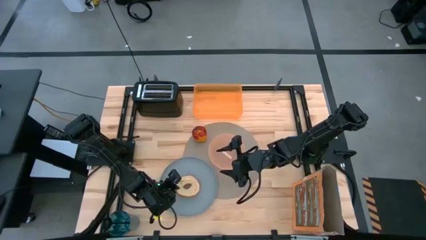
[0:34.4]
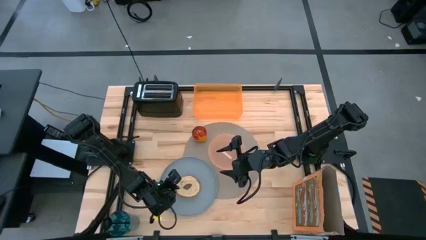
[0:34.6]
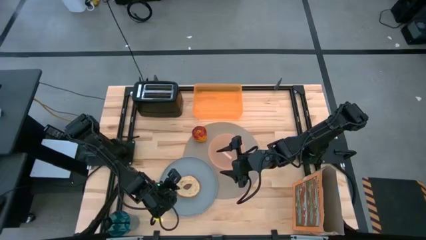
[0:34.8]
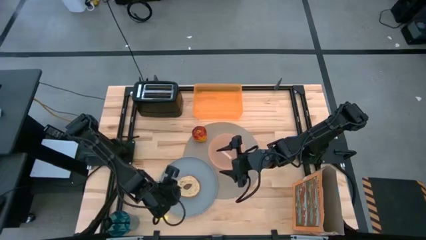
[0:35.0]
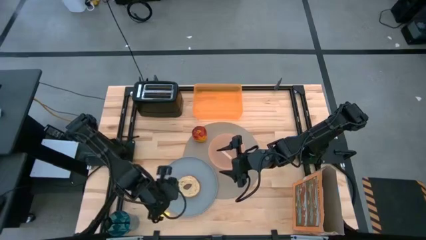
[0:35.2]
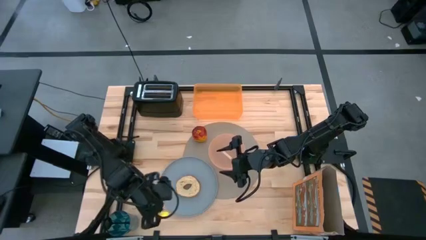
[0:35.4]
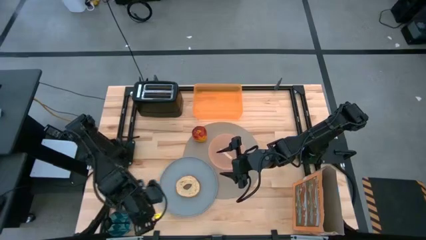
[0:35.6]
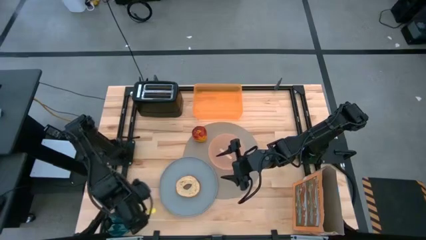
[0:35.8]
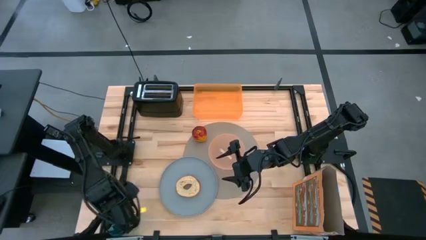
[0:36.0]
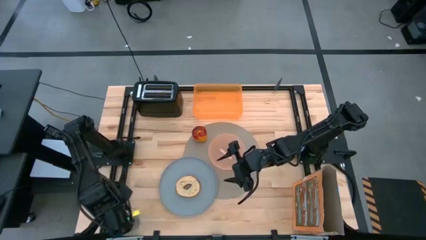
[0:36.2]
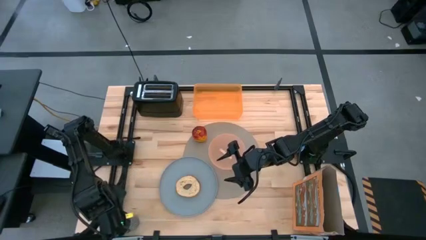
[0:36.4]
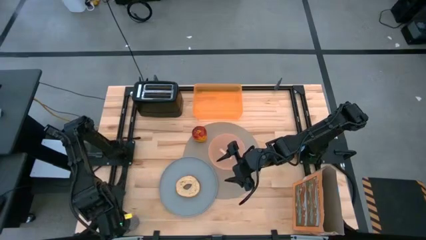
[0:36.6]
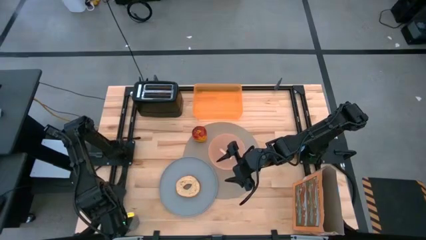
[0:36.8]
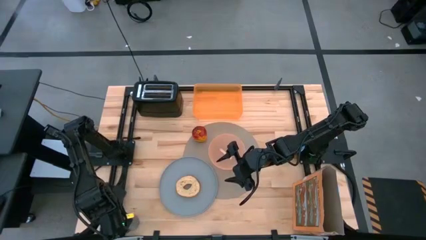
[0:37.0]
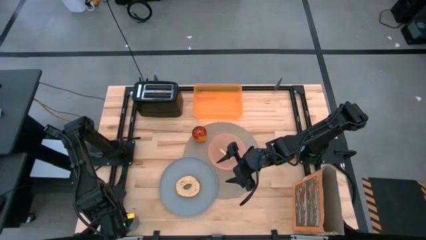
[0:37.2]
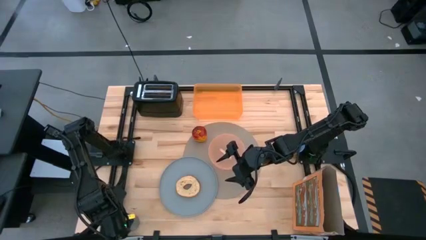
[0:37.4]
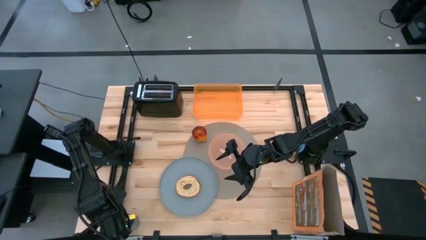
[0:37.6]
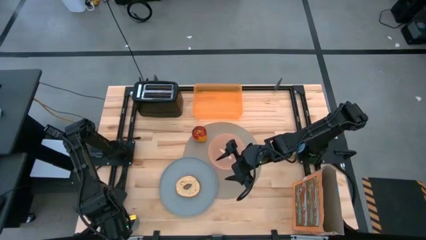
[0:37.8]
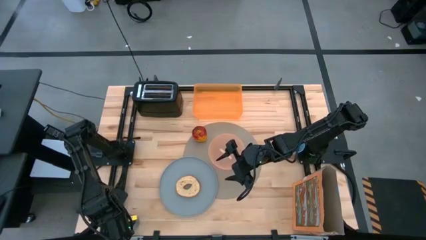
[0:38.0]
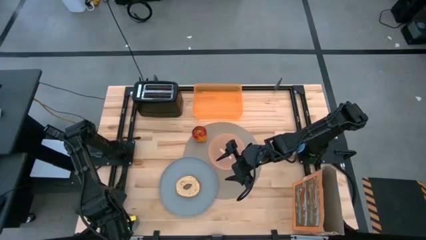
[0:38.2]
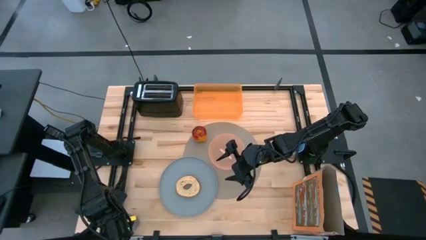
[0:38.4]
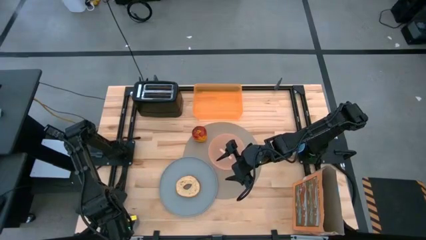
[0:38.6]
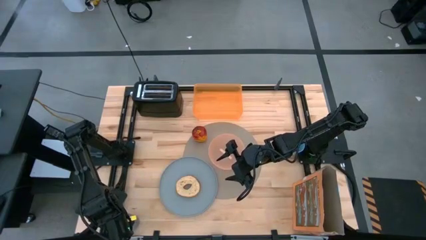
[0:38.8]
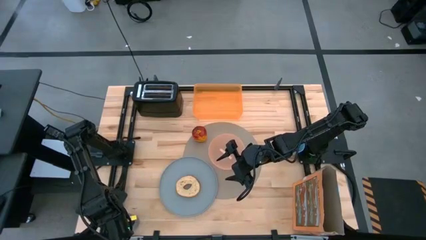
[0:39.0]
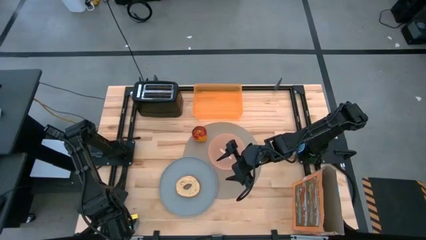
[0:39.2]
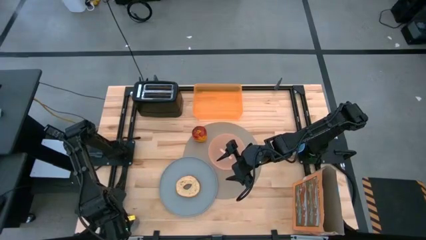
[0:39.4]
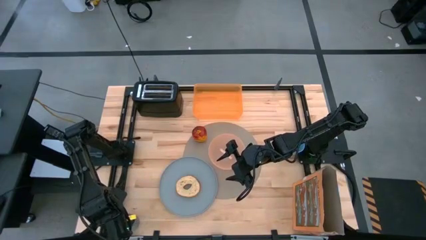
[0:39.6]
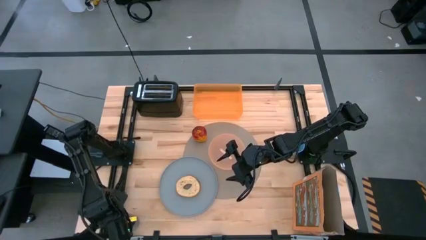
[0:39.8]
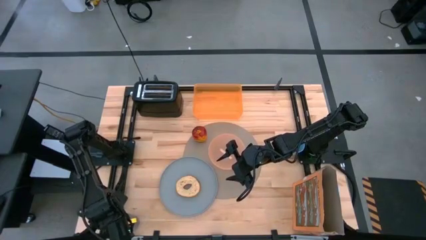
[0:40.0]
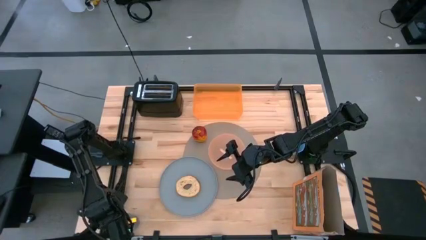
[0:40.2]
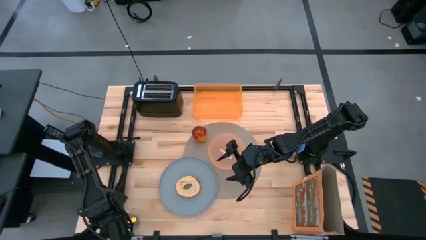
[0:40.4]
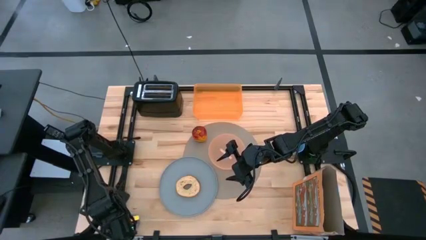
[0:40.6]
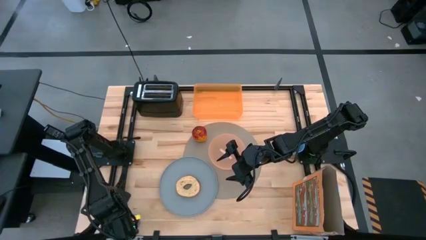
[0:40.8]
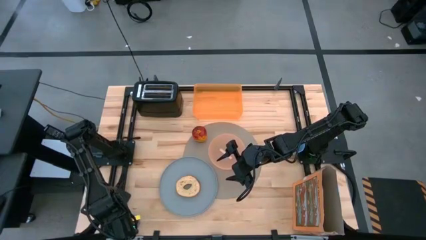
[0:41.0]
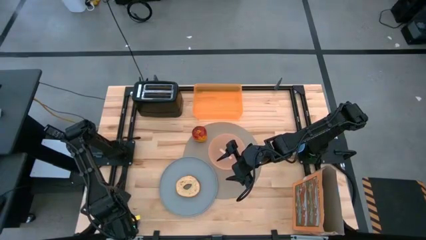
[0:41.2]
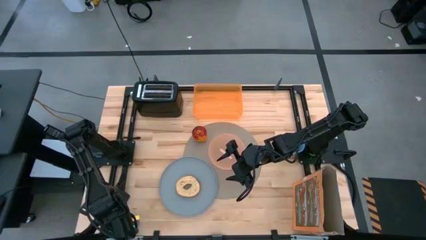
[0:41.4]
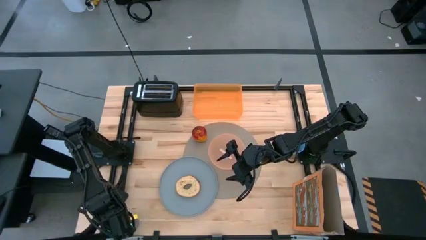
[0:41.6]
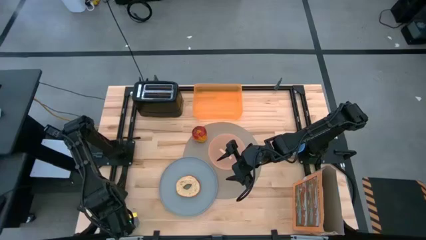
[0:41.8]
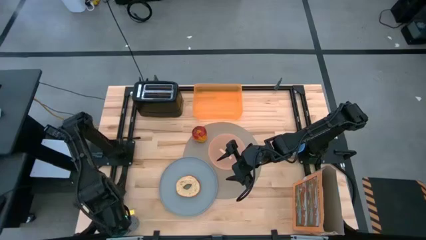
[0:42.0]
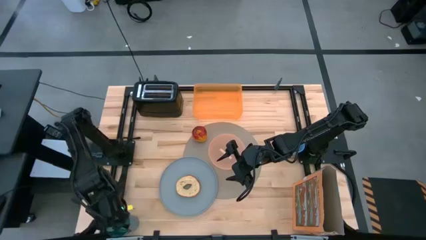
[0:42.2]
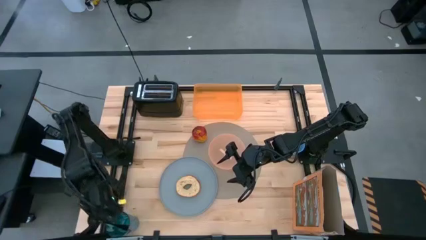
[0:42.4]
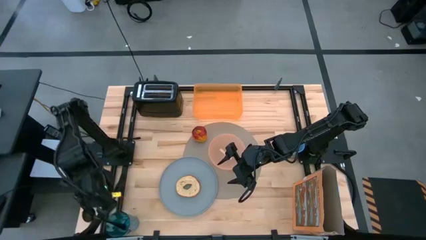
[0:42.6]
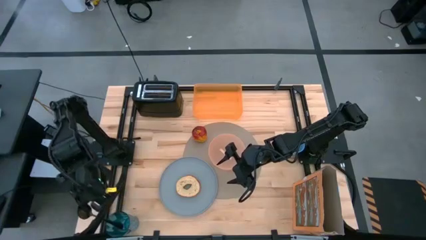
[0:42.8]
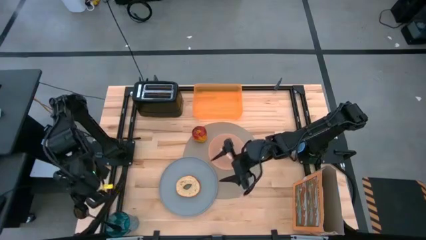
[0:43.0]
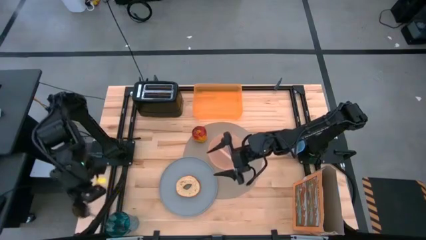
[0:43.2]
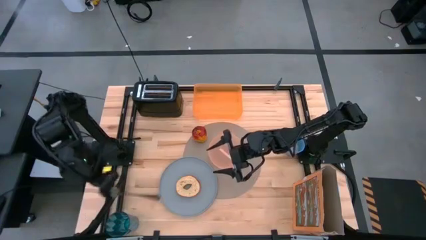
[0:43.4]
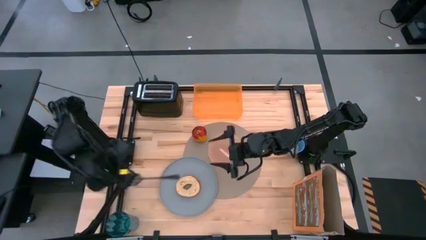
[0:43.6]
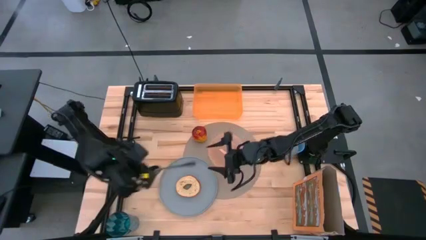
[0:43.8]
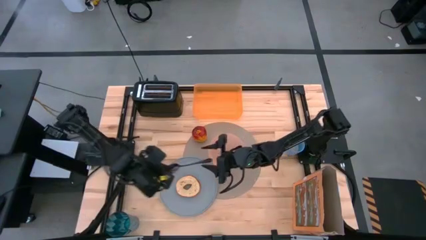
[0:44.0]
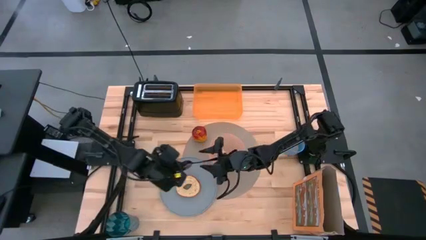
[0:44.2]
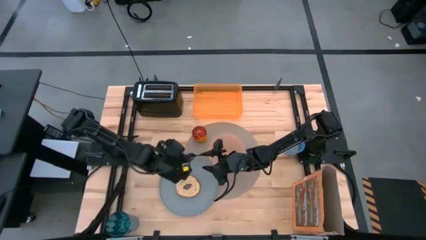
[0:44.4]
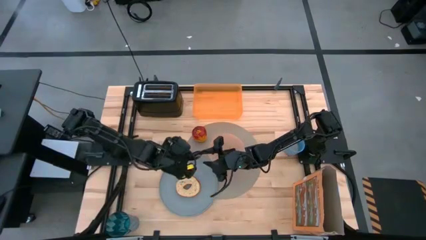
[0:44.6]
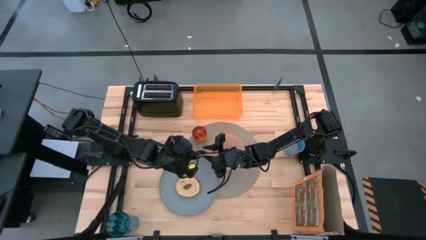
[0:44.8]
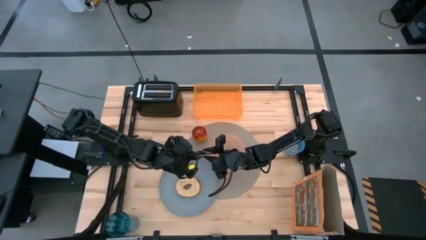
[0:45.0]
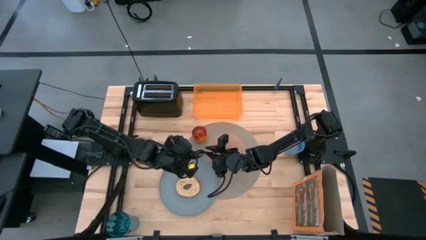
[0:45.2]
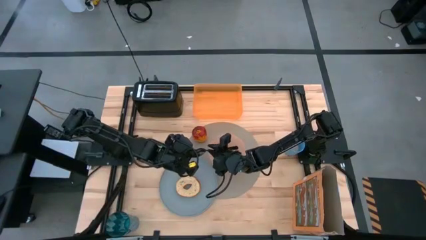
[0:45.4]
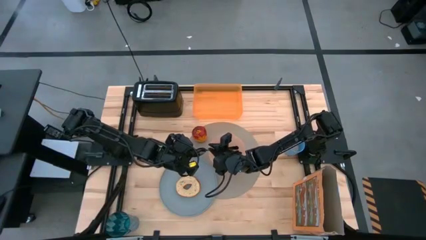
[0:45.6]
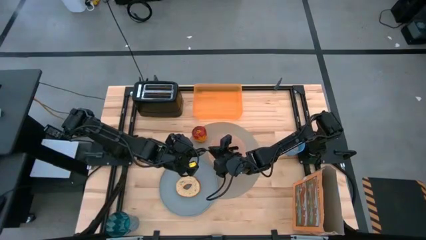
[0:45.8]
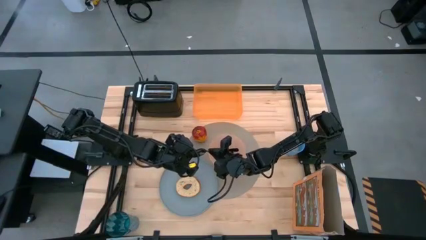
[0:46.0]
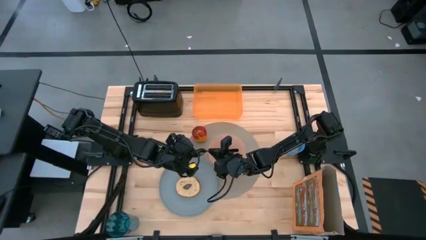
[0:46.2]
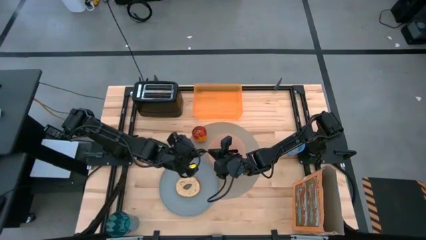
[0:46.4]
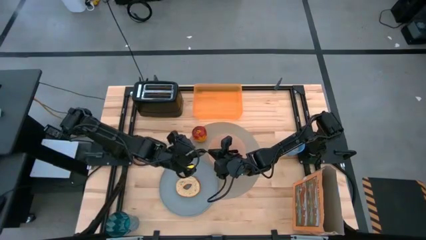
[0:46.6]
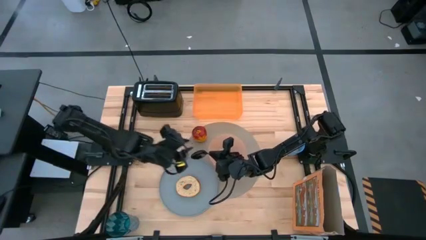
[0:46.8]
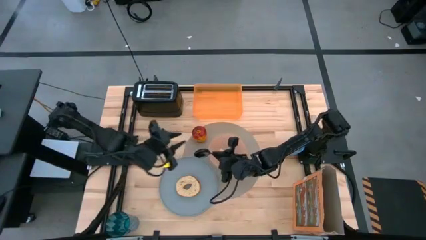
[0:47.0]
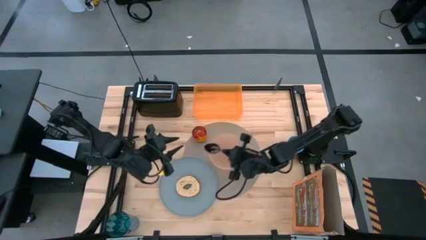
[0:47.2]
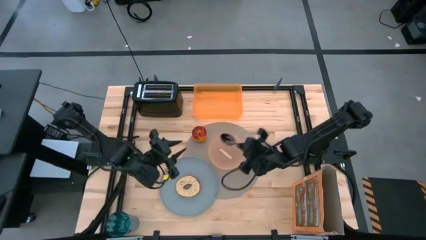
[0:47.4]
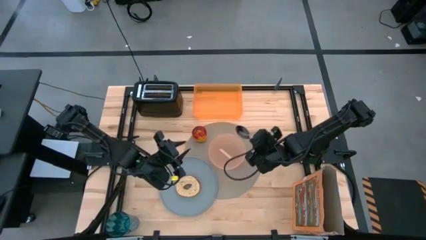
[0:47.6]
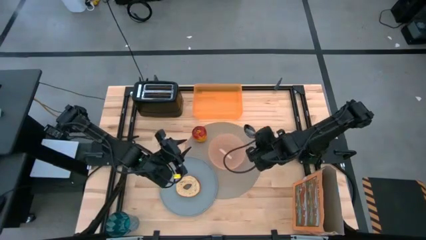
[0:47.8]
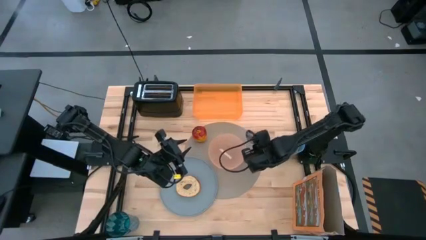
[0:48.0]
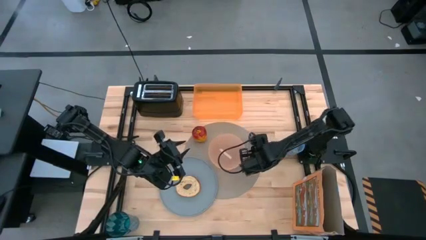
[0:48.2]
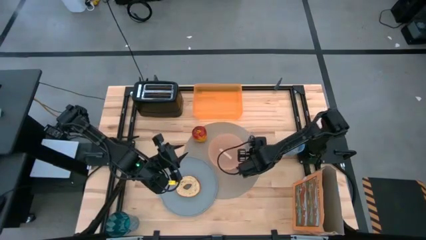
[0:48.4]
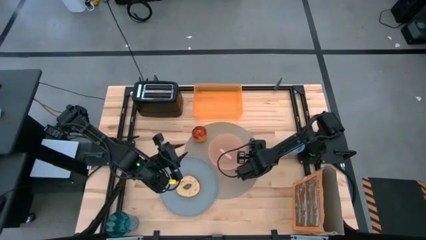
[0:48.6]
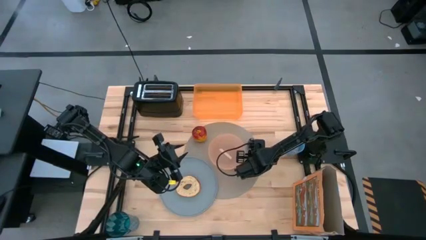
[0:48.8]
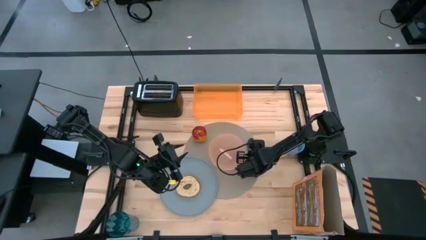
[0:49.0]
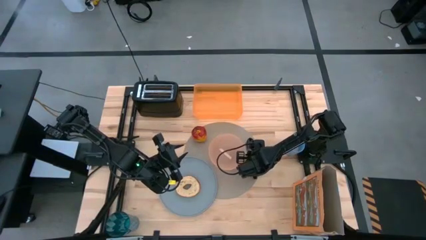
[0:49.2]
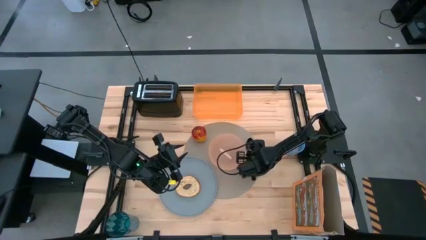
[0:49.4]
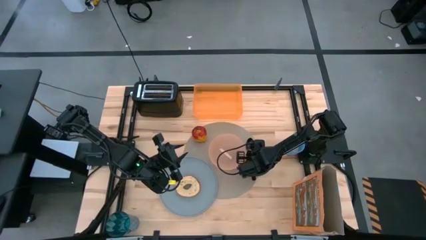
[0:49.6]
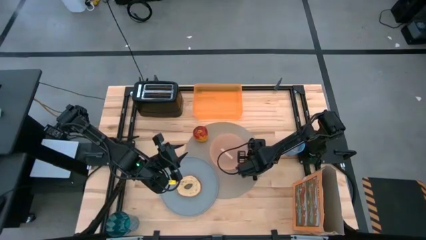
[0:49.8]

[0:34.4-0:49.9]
Task: Arrange a breakfast setting
Put the black spoon on the brown table mat to right of the orange bowl
